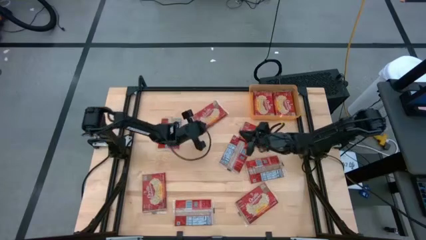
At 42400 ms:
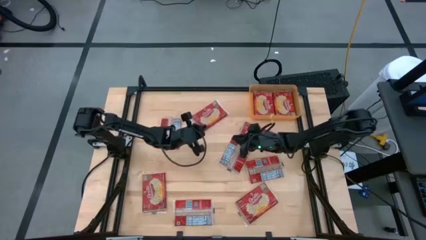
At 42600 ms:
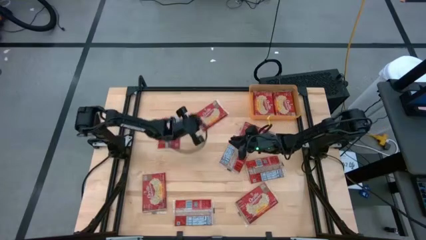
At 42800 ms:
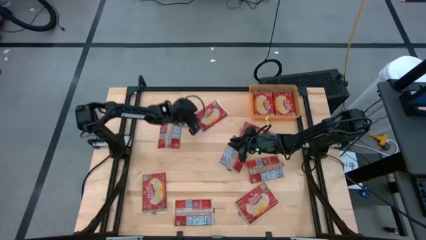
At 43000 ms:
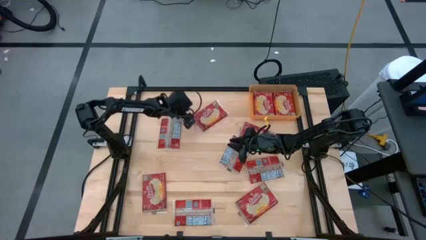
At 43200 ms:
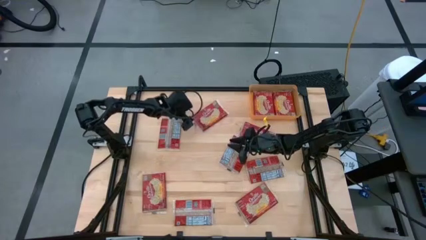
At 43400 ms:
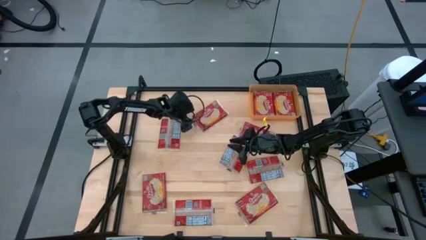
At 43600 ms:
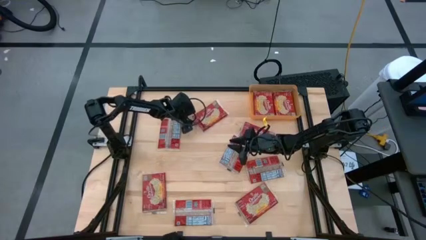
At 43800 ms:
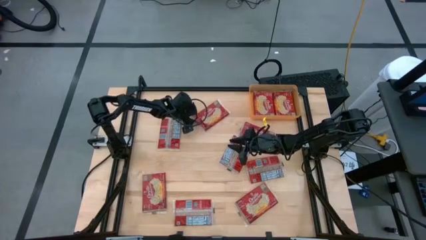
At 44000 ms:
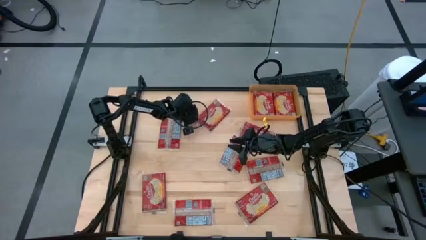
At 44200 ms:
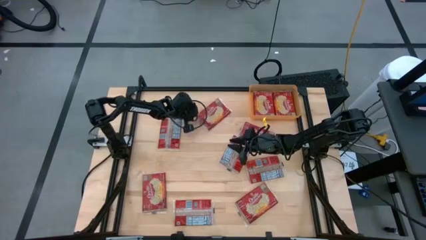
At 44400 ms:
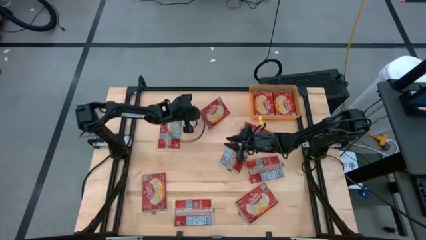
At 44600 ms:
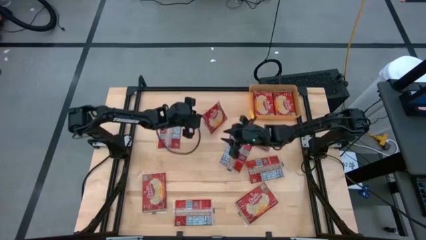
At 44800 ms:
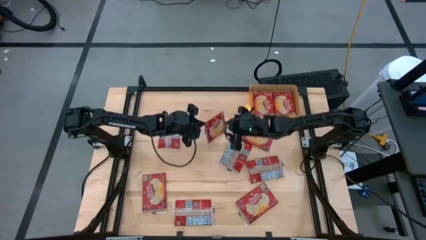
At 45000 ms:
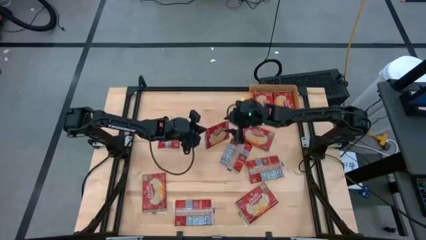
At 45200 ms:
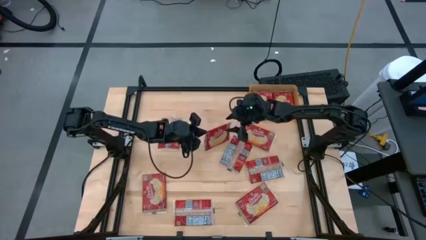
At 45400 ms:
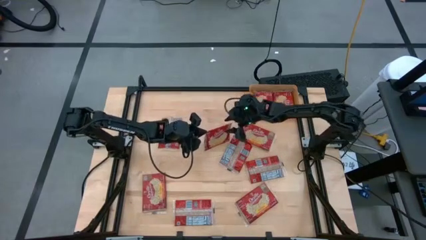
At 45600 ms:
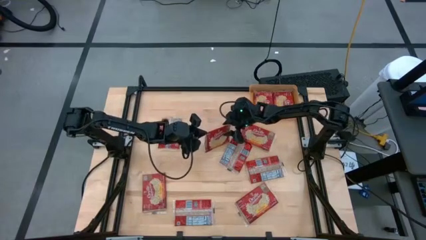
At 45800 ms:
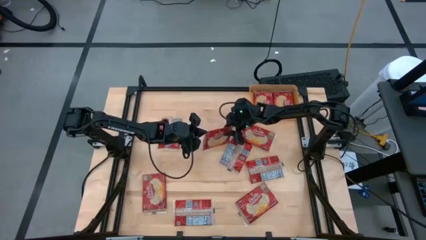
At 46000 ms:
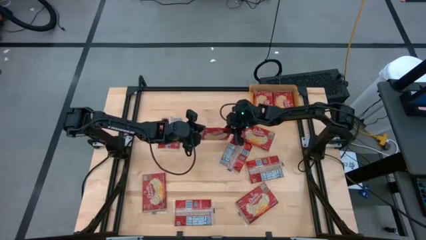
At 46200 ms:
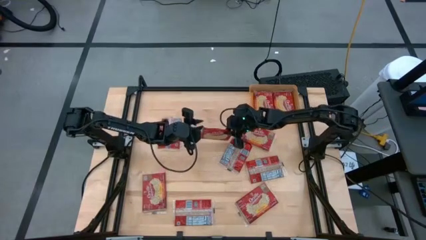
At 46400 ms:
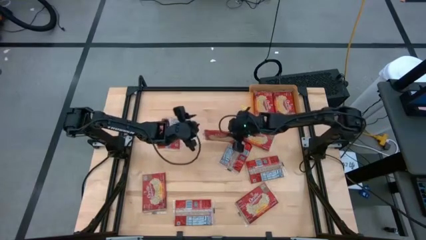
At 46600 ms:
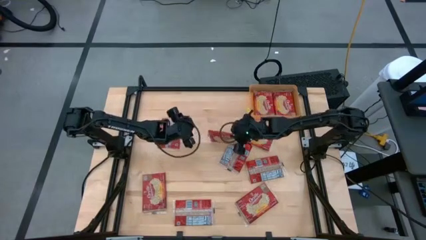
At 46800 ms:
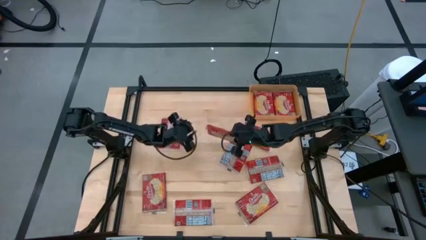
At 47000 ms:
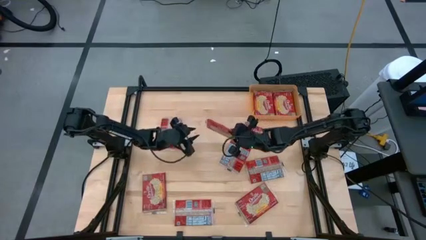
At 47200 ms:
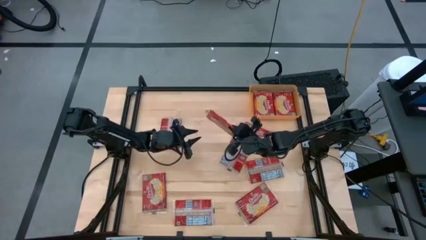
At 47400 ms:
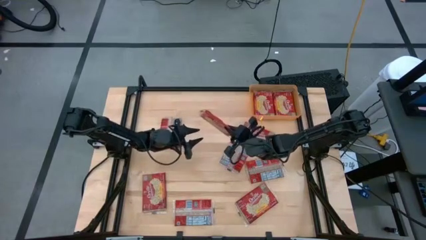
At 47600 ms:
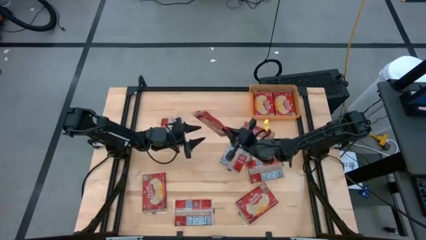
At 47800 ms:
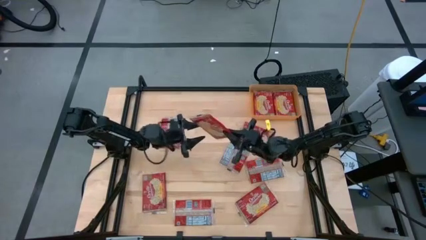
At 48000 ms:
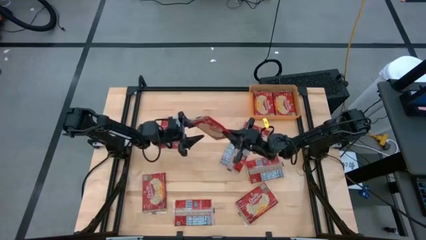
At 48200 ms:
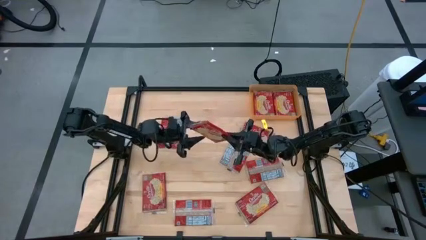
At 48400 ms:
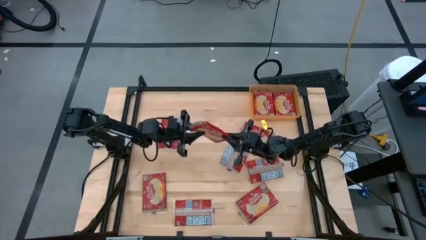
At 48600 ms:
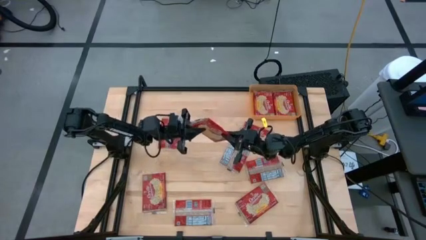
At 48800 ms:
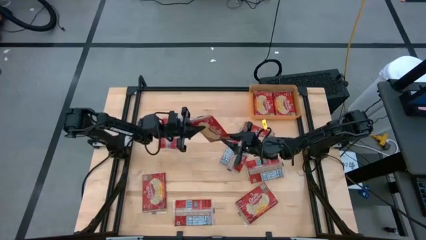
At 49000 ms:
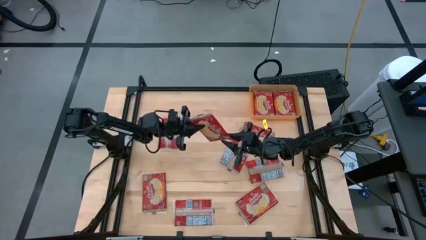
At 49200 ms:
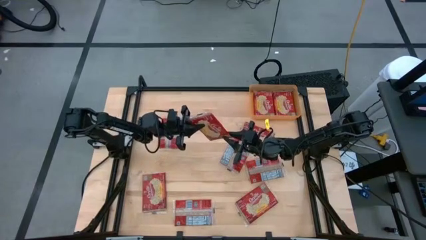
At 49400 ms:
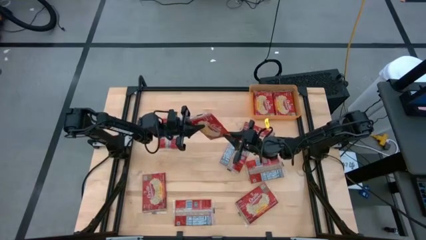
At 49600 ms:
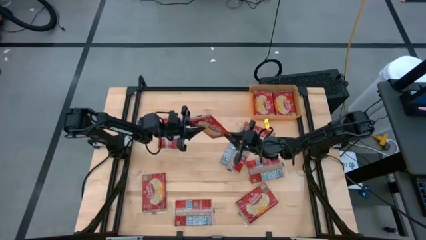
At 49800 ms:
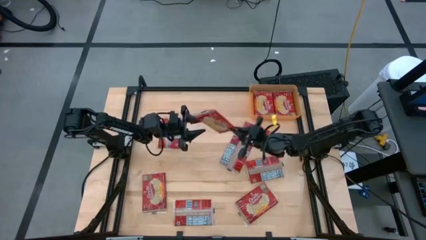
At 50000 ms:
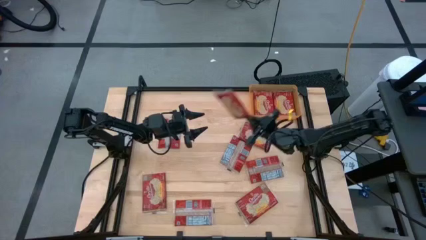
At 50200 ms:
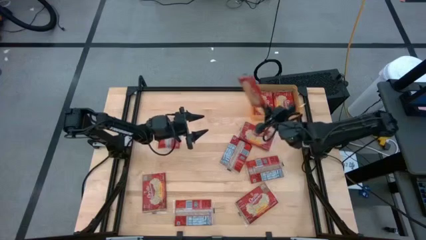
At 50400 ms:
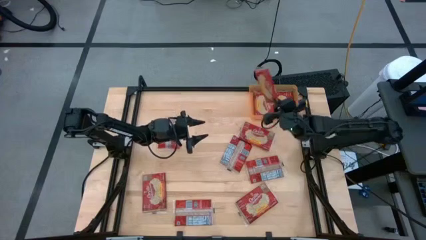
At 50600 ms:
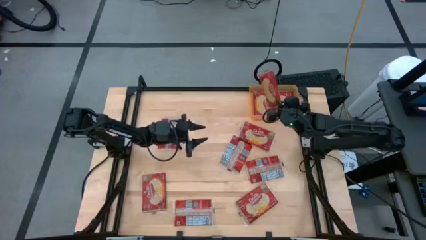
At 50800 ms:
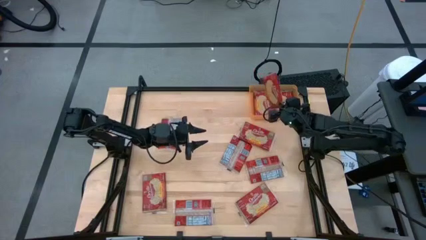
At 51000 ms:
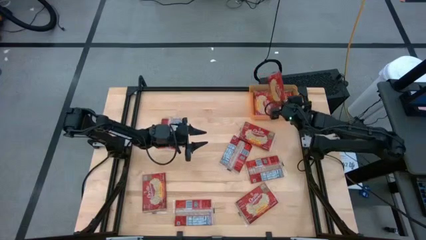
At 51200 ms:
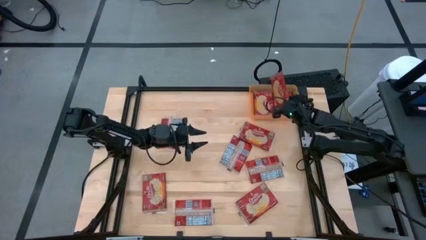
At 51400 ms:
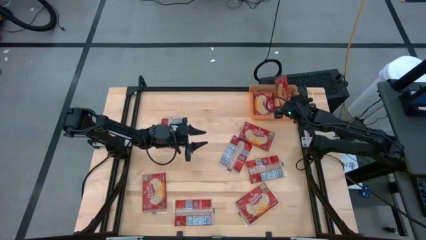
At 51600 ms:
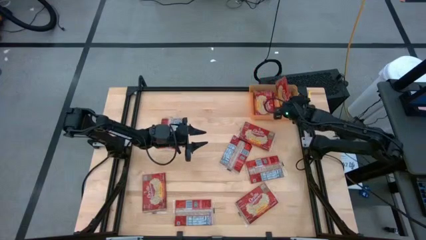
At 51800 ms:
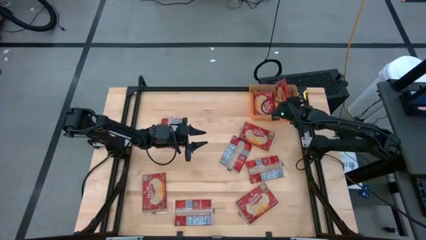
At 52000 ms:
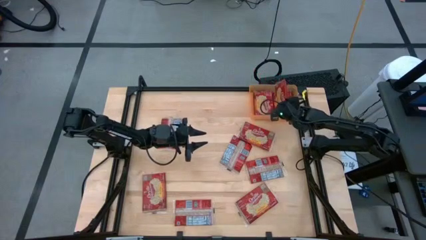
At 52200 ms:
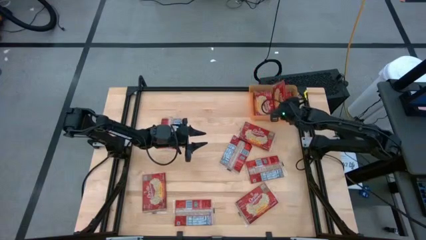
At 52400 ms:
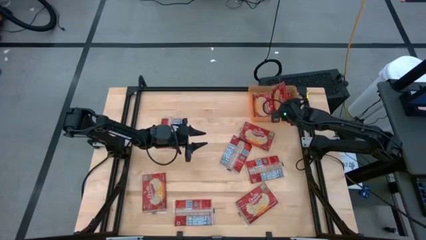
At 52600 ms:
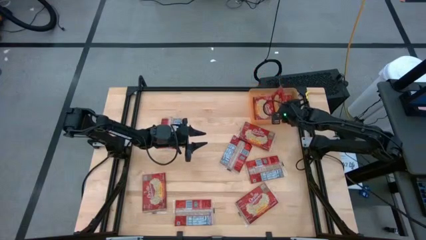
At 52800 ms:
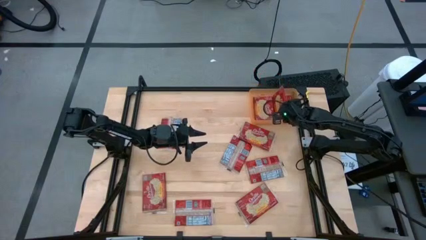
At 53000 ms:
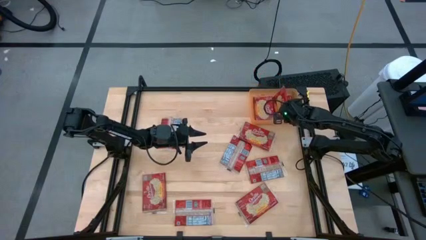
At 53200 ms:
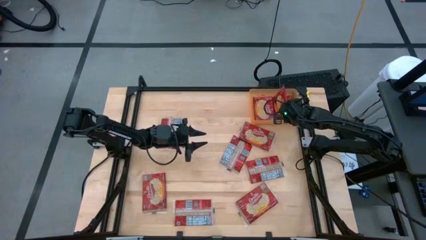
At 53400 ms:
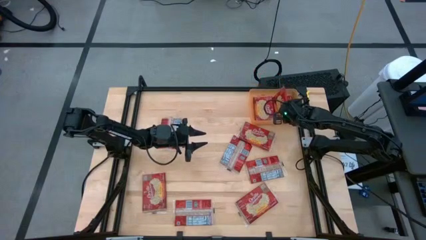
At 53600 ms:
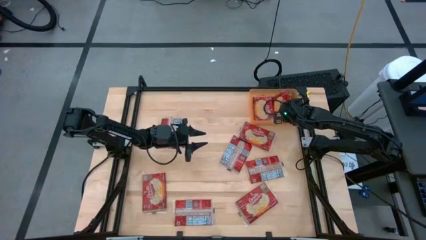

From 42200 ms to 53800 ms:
Task: Sort popcorn bags into baskets
Put the red popcorn bag into the orange bin

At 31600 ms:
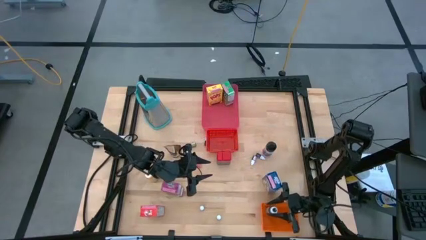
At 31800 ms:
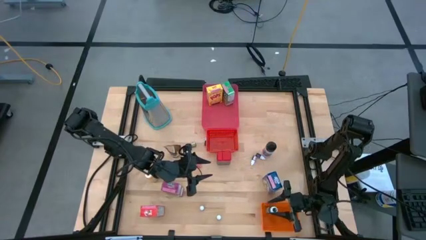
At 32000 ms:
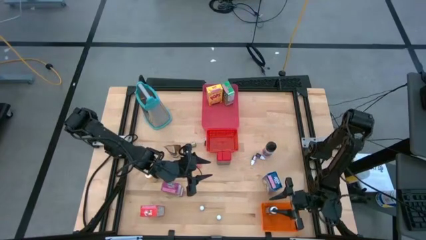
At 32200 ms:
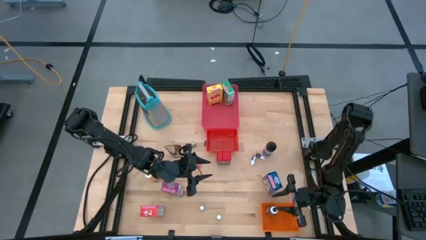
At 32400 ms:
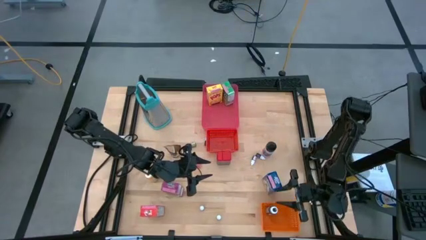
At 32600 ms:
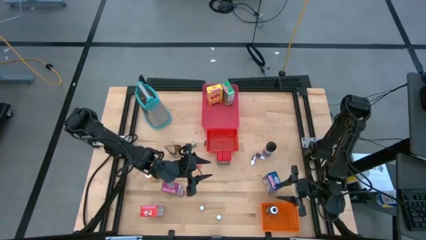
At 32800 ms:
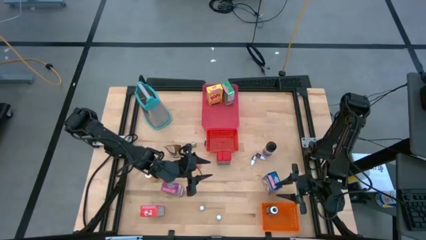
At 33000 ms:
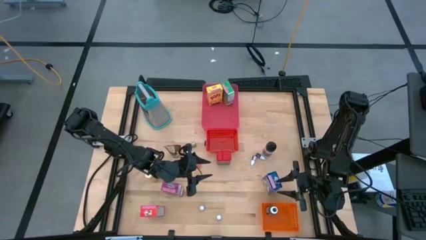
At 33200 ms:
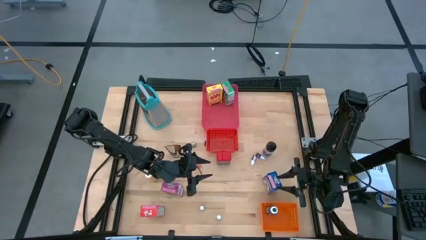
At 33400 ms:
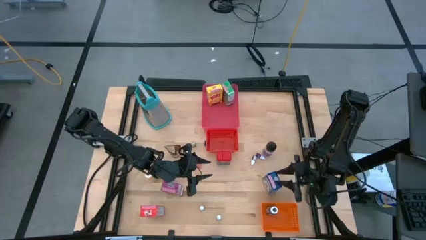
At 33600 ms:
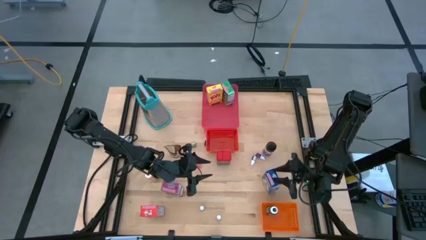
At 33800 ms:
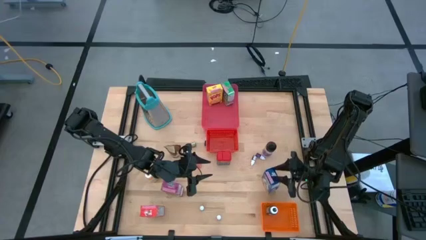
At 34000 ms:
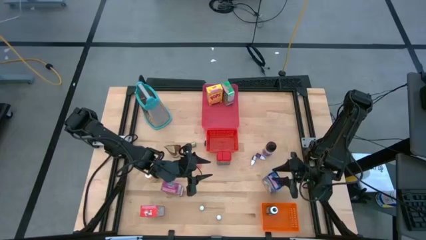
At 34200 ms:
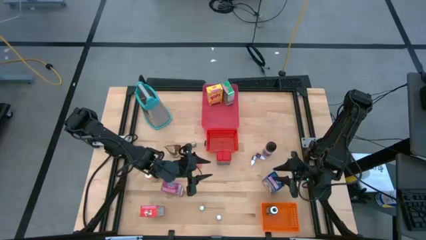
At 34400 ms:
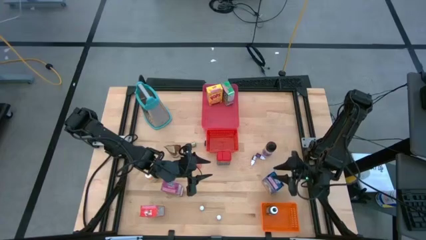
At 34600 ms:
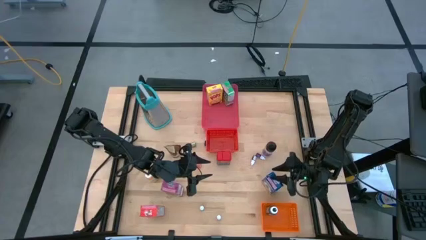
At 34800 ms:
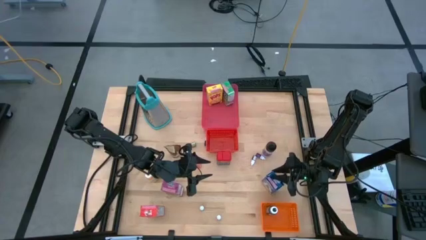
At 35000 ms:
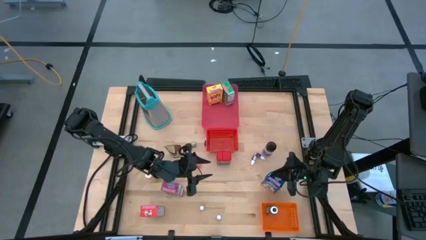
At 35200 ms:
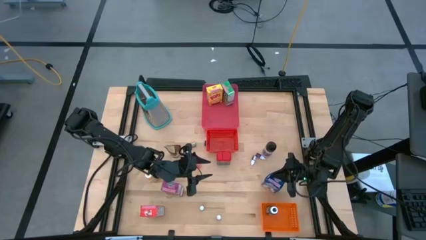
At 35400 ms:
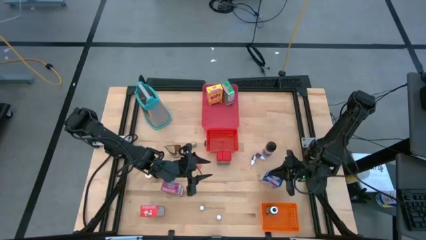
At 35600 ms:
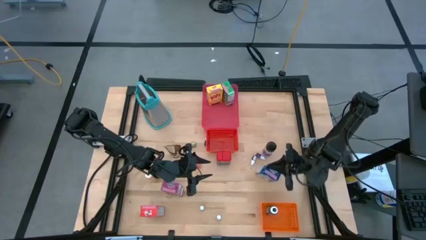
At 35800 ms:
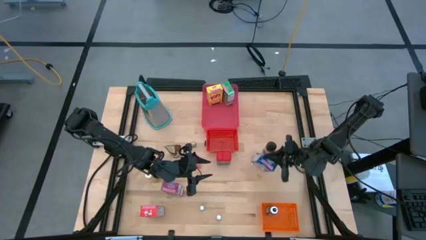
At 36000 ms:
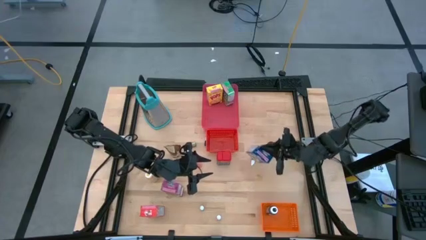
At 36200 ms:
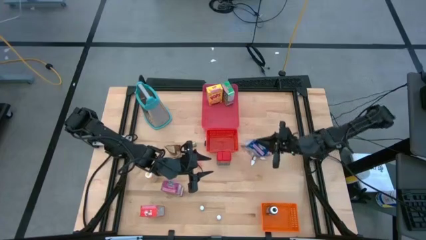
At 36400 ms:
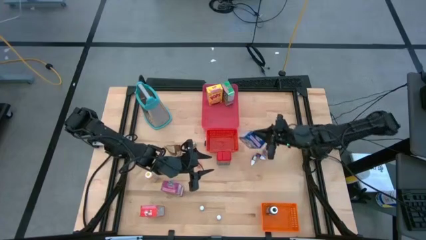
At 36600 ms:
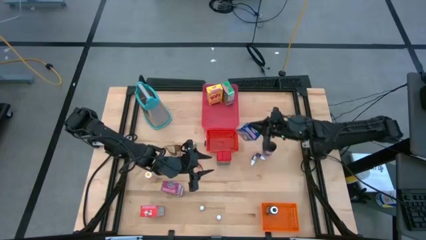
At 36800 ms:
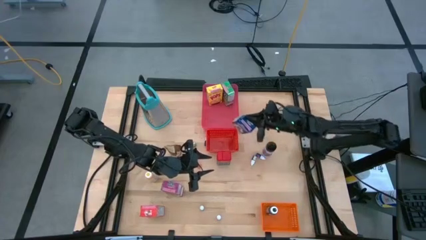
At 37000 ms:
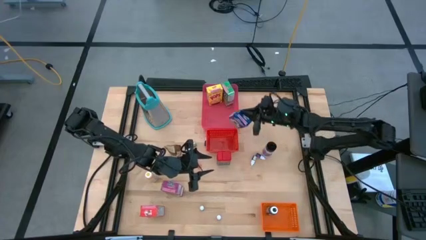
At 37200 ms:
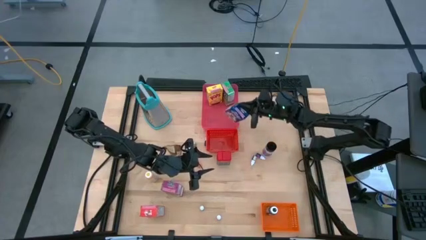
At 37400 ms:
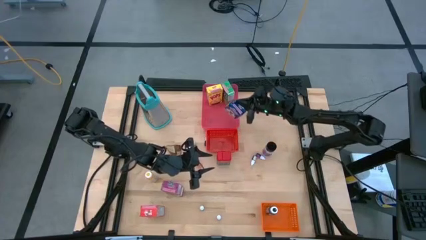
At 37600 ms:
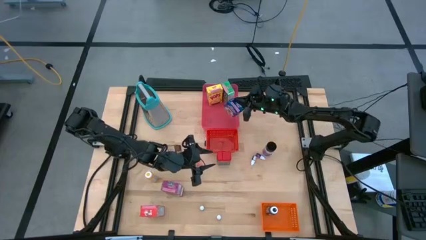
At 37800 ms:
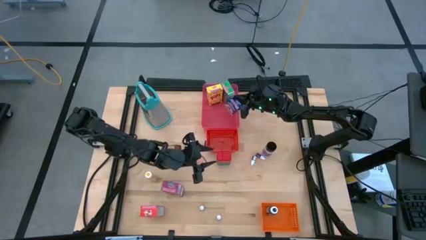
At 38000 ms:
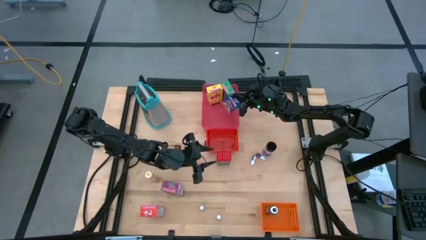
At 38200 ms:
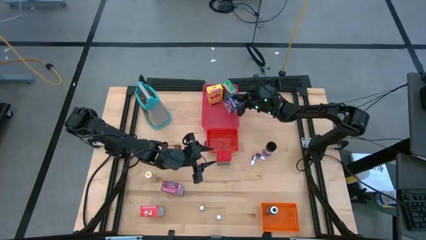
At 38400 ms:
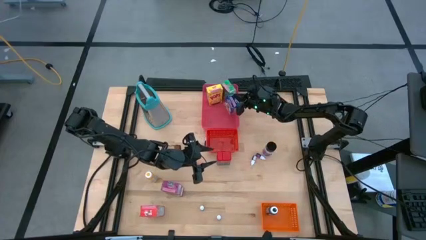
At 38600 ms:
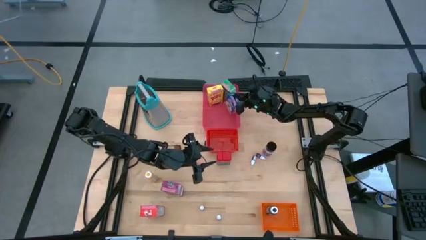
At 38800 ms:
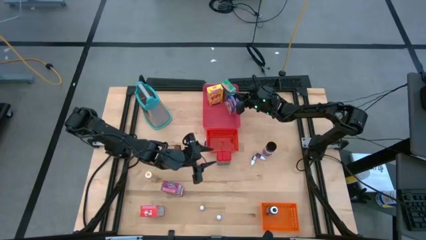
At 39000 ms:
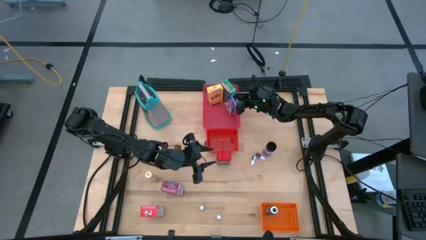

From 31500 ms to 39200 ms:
Task: Pick & Place Kitchen Items
Put the blue cereal box into the pink bin
